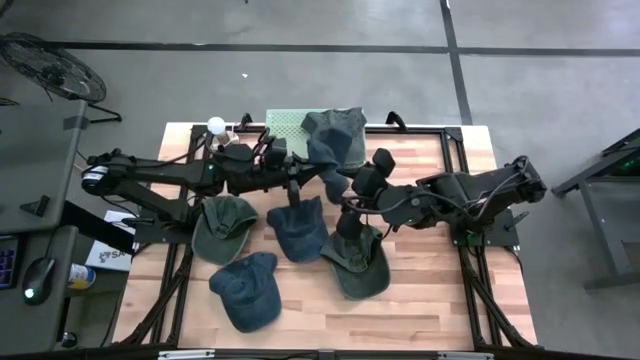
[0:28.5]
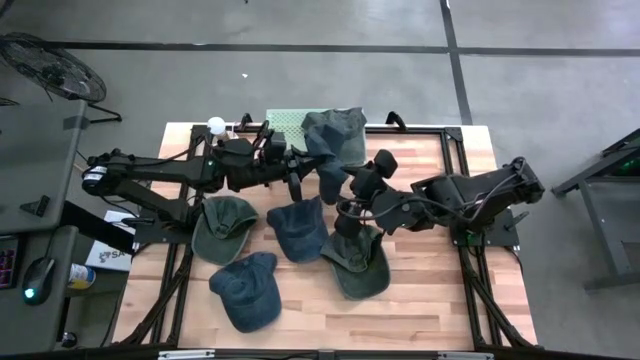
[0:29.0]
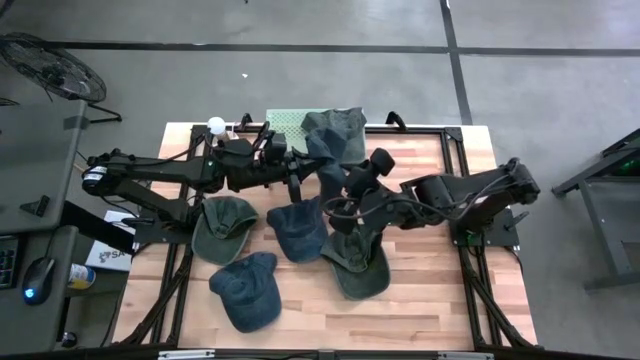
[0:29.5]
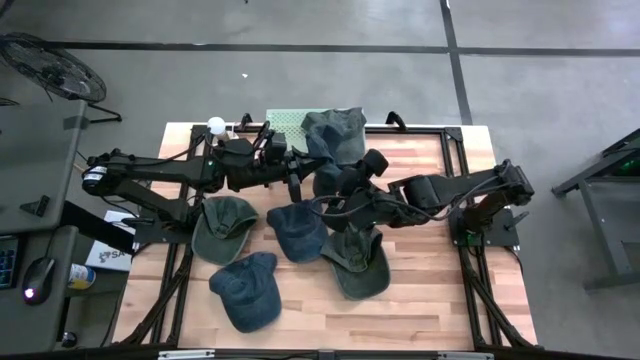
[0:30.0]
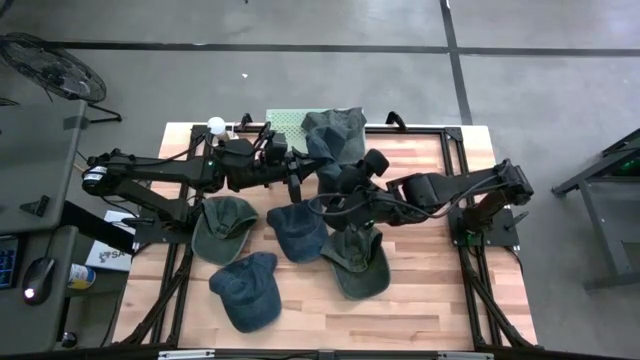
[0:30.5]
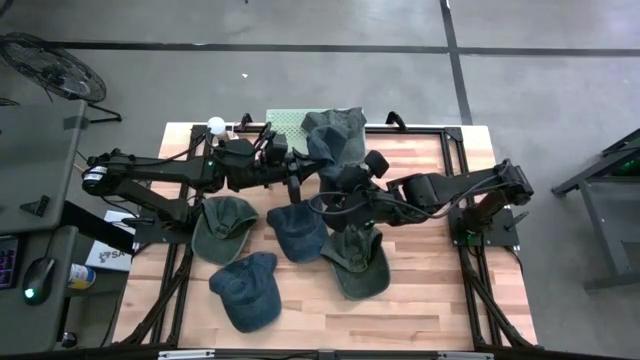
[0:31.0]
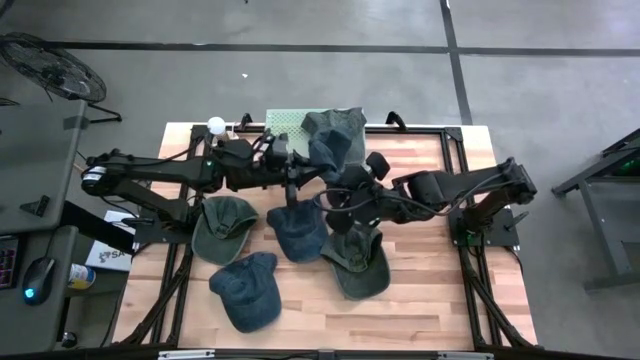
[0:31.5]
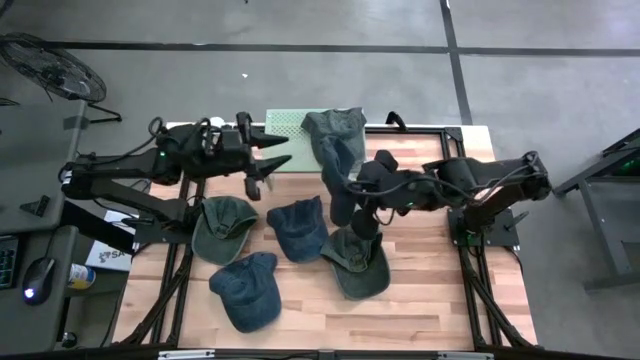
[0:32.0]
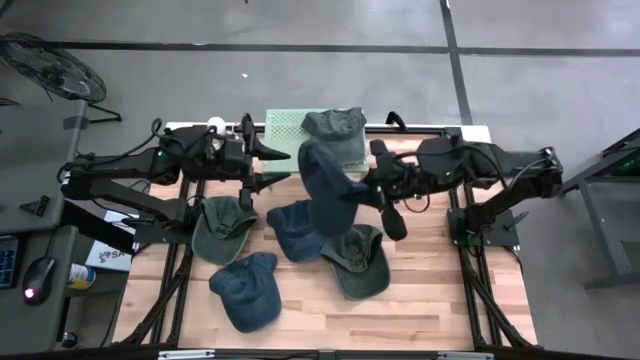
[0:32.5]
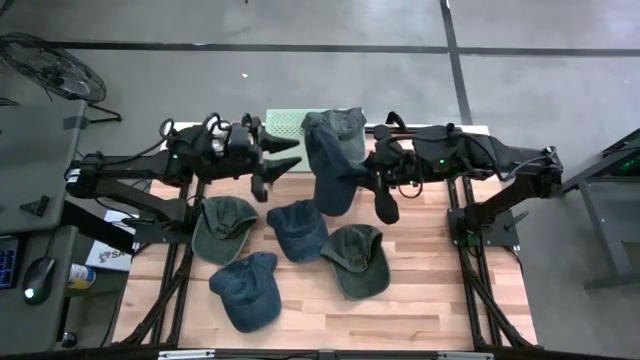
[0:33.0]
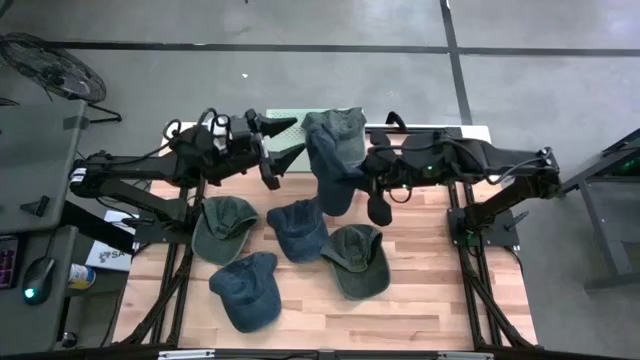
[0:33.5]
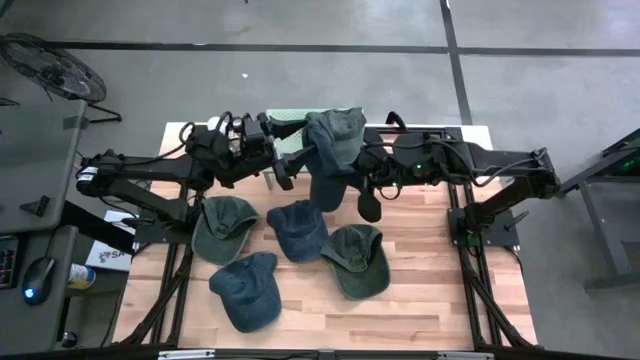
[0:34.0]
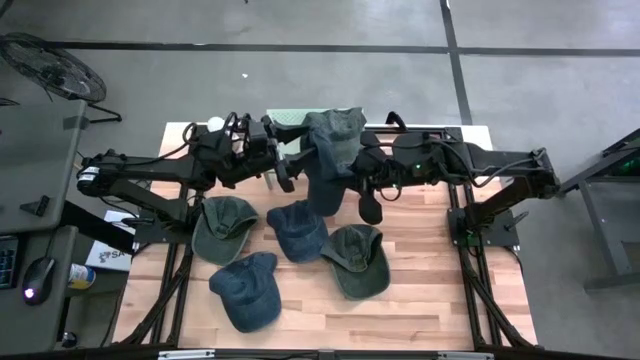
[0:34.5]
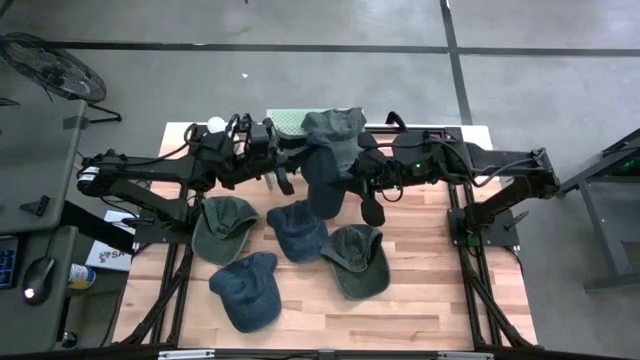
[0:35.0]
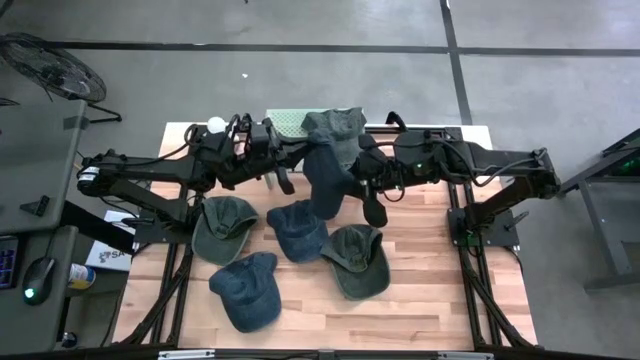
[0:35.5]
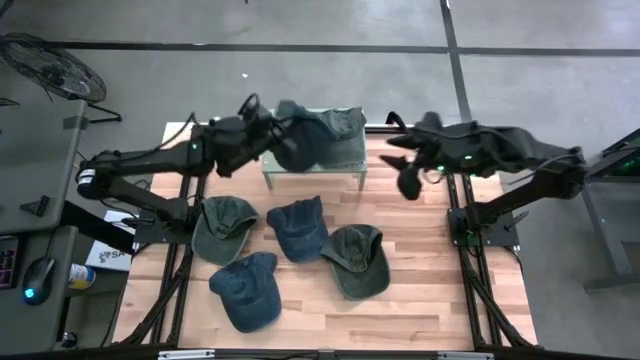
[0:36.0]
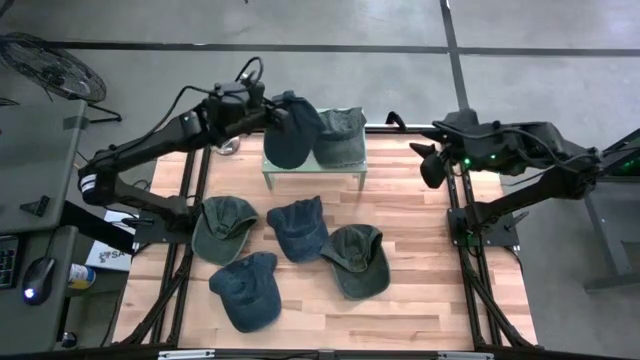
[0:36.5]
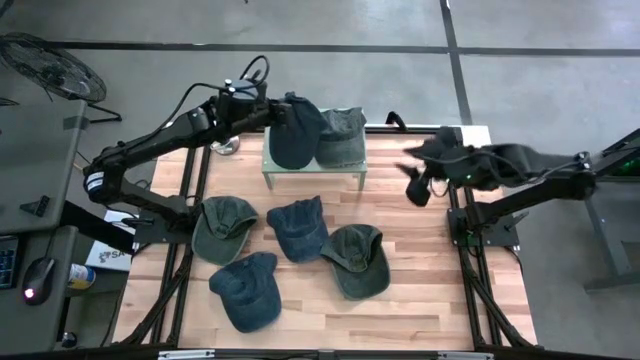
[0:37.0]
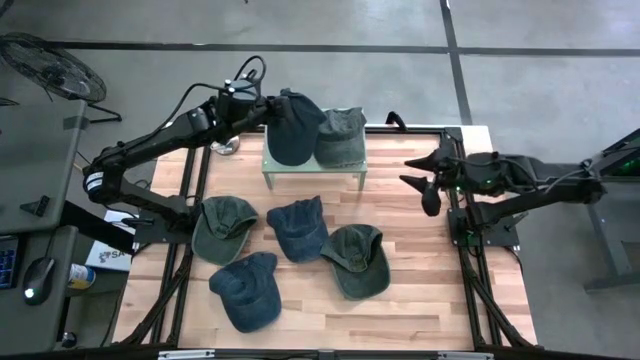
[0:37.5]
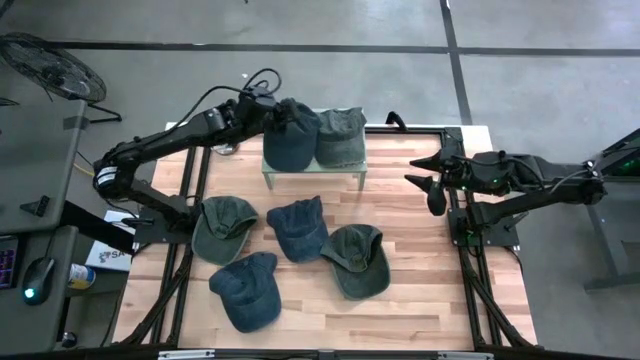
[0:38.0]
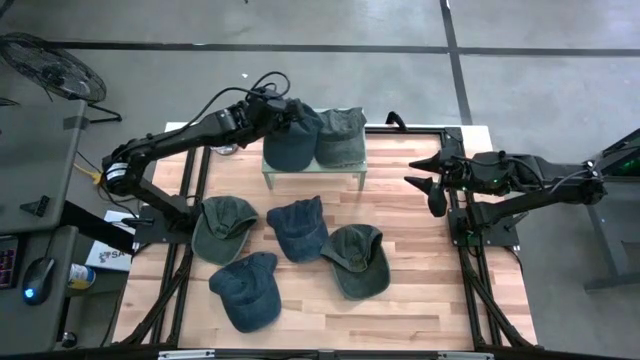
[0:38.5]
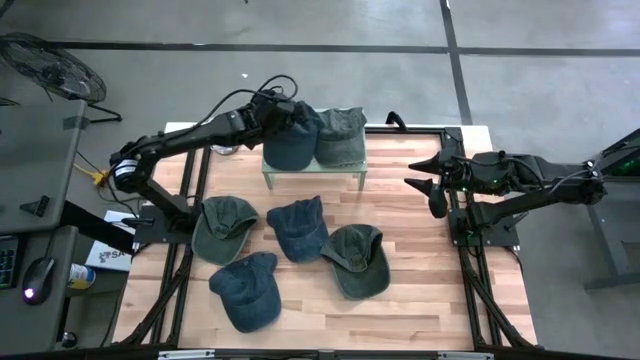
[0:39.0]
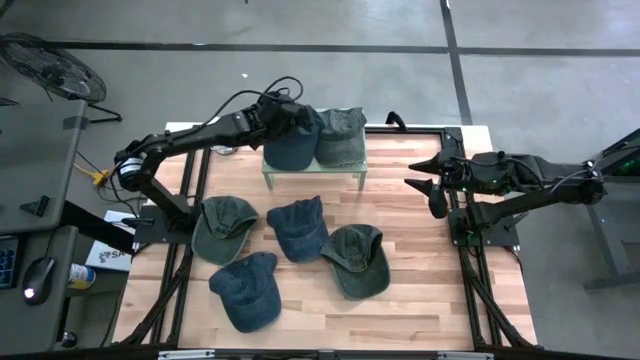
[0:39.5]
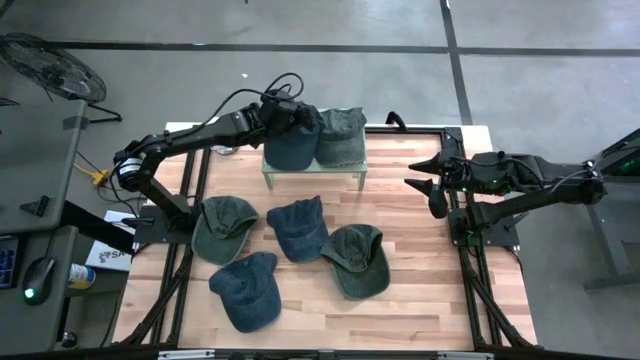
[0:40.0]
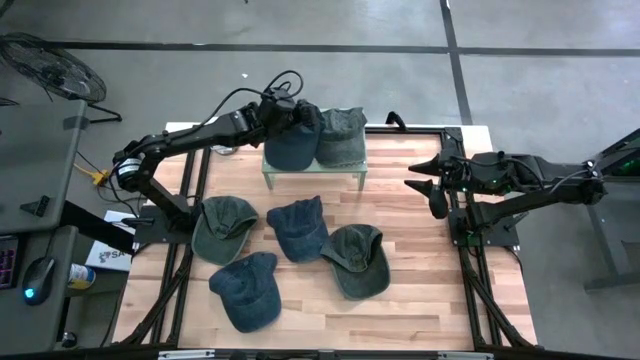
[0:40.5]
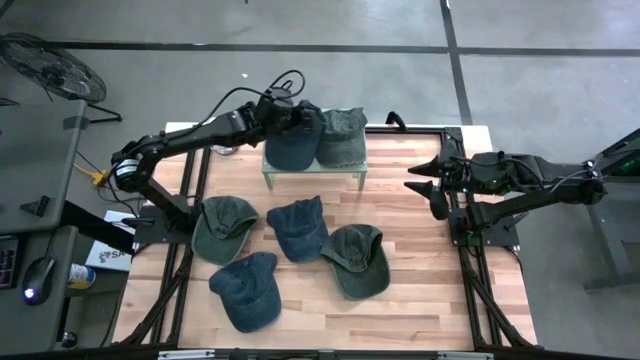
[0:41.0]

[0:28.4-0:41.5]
Task: Pick & Place hat
Put the right blue cap on the shelf

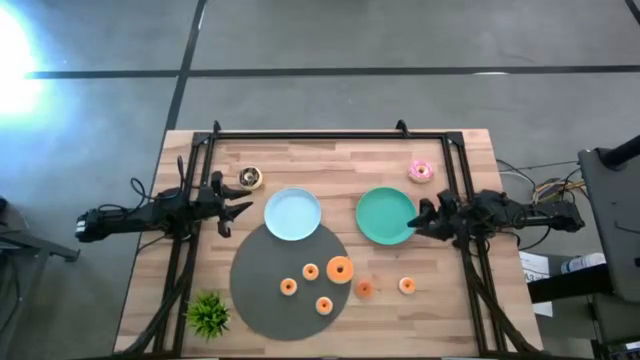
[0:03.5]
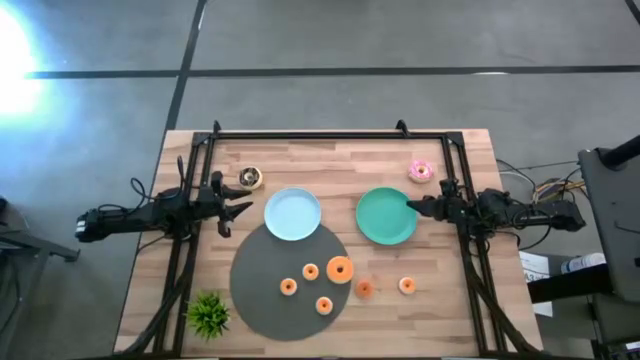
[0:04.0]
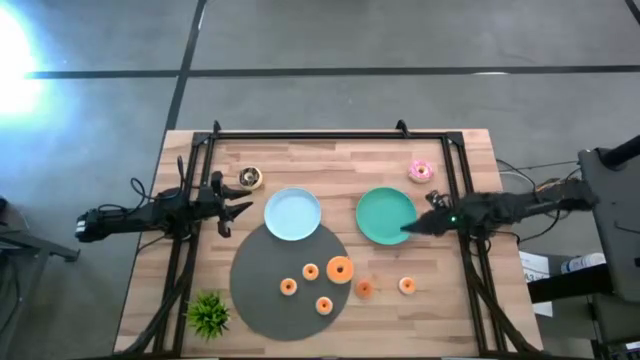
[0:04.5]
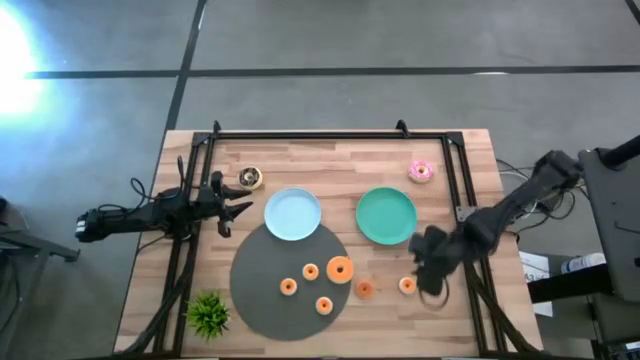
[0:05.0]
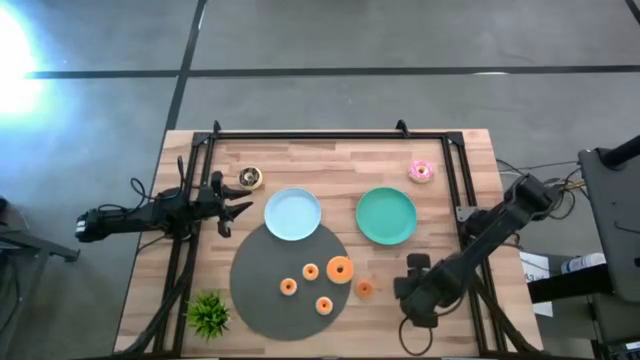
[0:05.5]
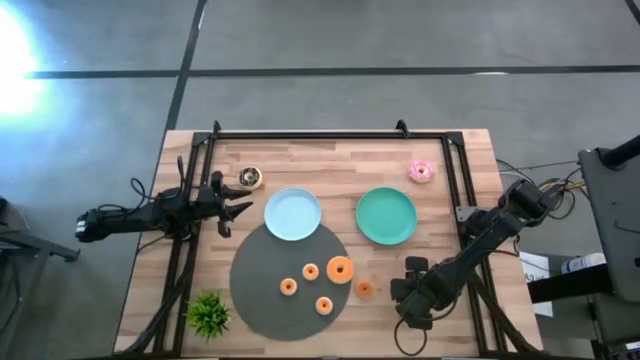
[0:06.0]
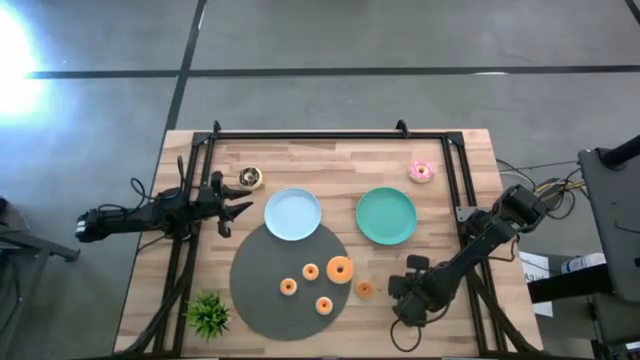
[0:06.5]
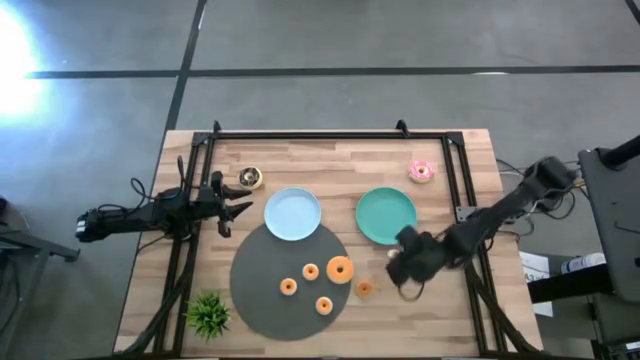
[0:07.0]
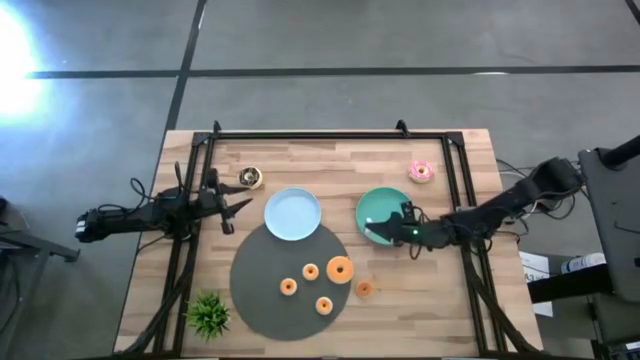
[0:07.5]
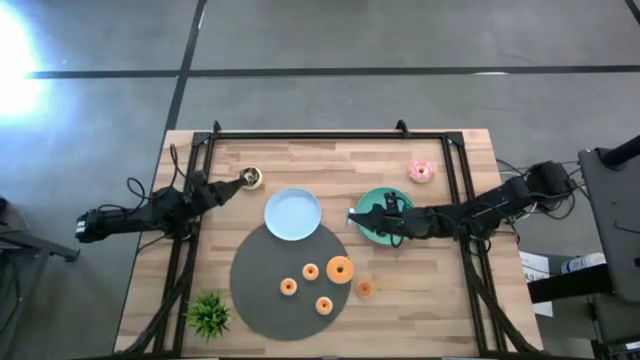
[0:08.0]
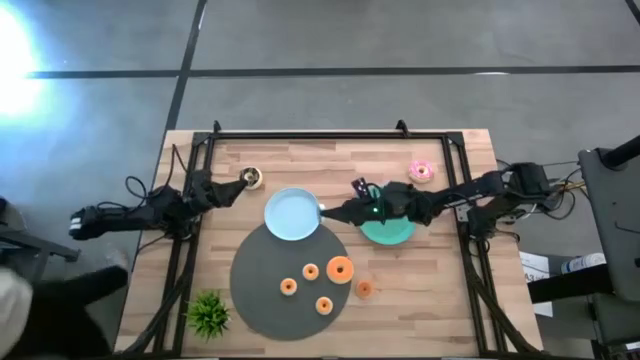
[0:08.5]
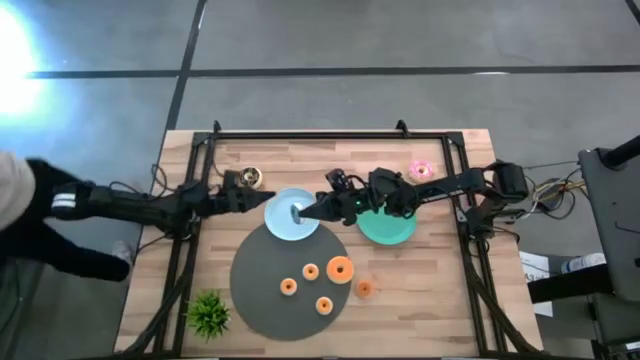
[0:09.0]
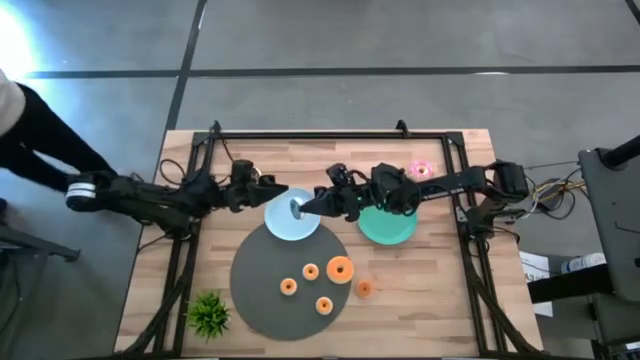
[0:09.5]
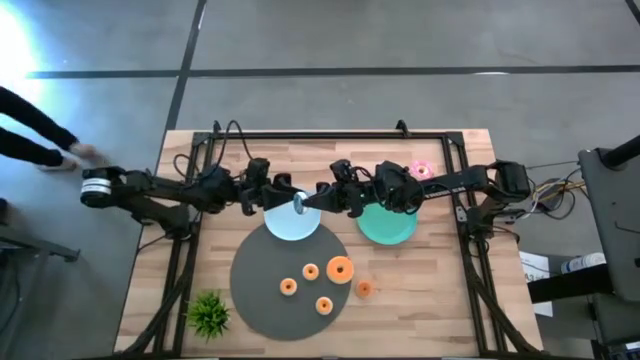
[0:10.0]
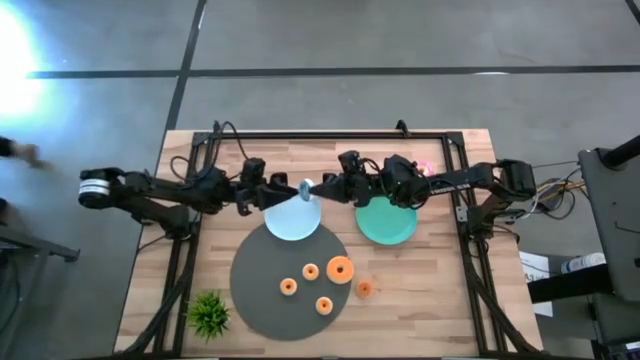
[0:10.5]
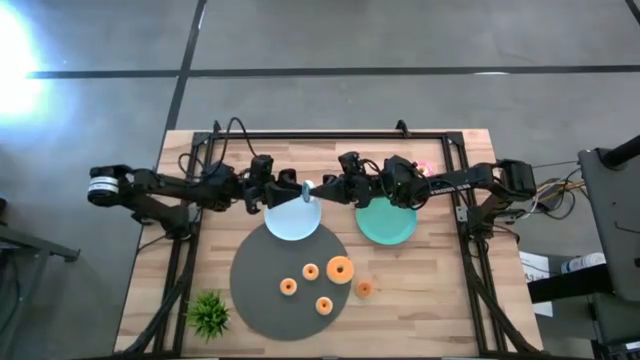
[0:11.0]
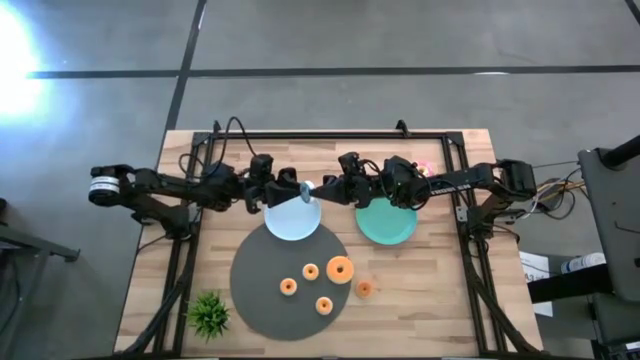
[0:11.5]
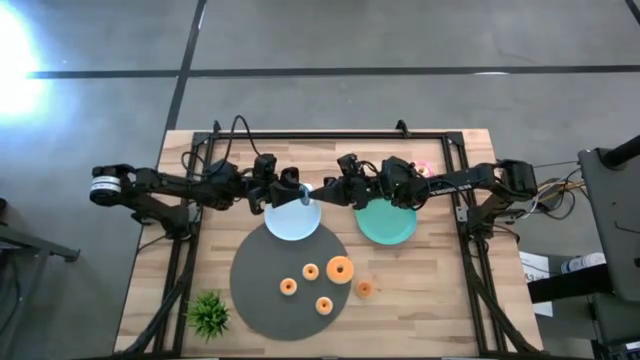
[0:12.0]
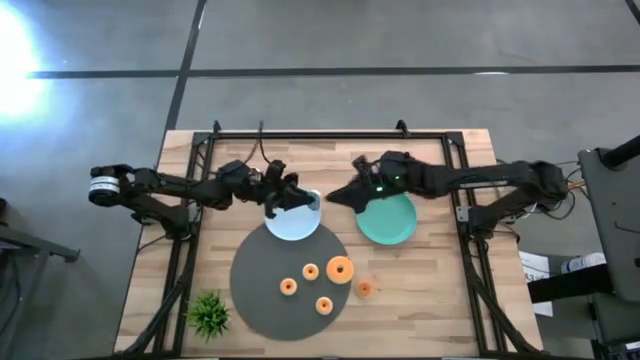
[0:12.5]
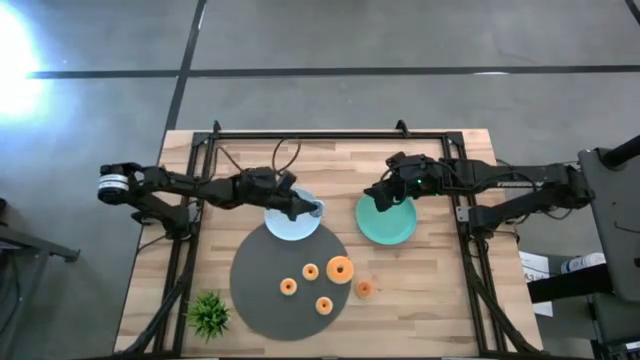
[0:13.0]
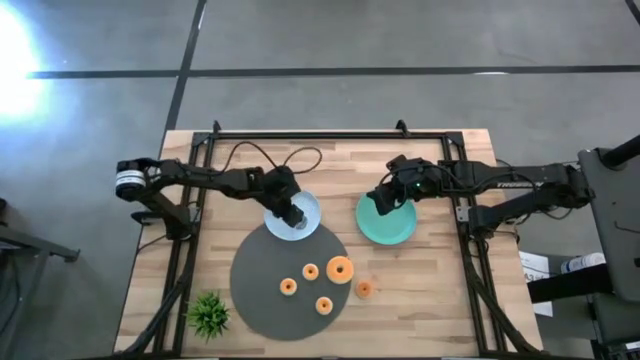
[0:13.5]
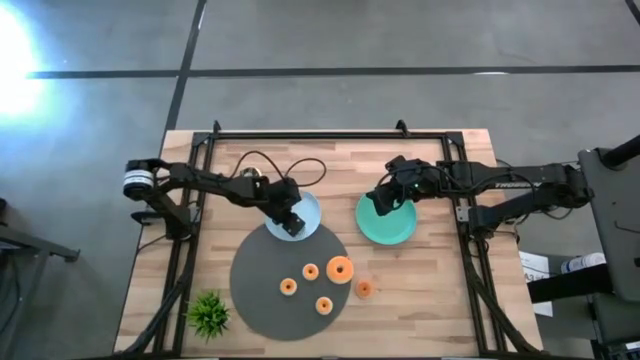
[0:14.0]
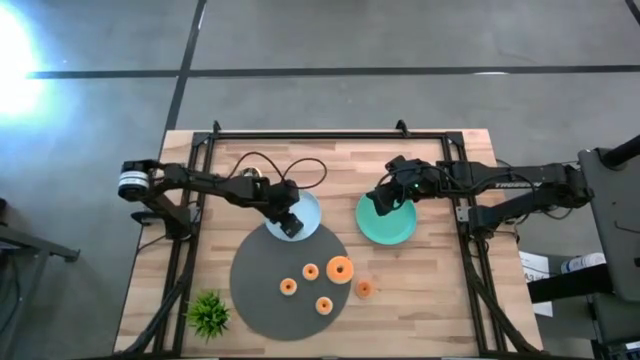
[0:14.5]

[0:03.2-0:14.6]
Task: Pick & Place donuts
Put the small blue donut on the white plate
